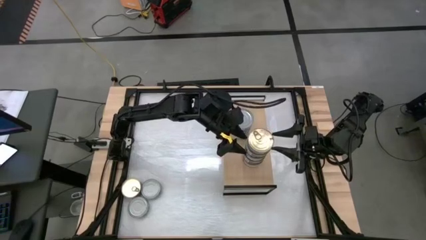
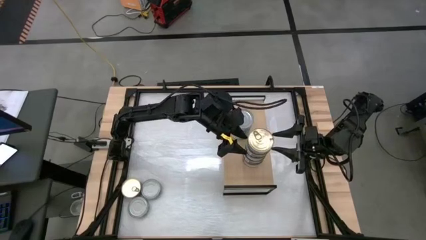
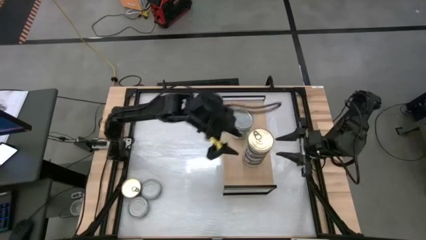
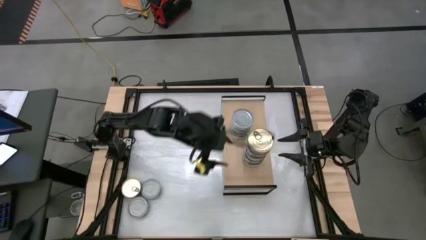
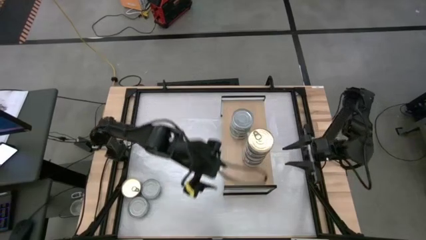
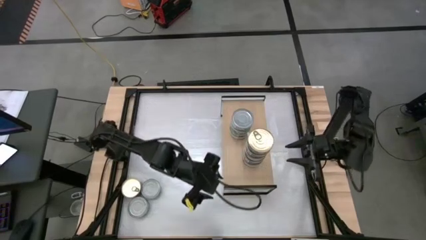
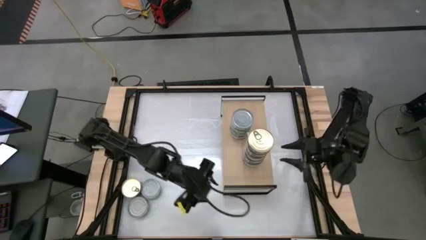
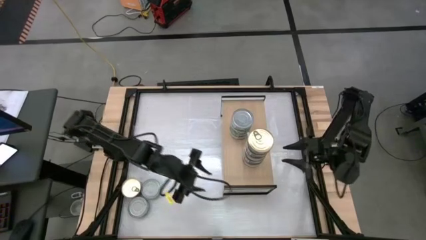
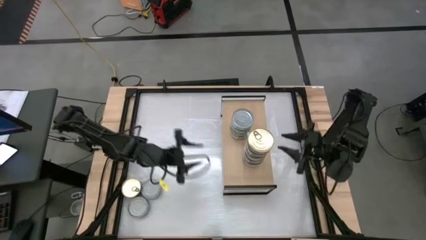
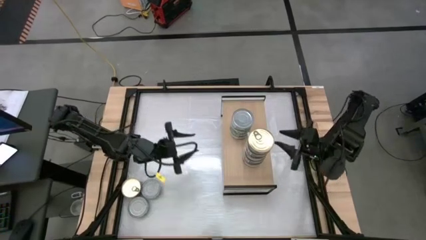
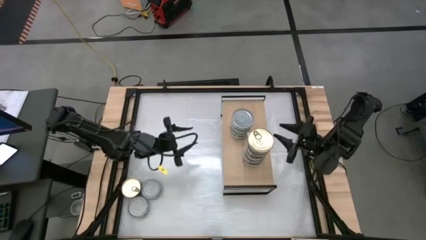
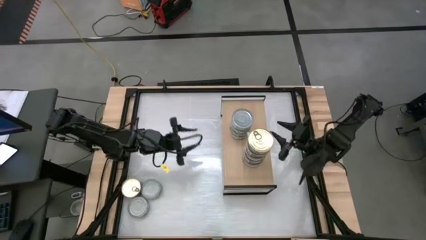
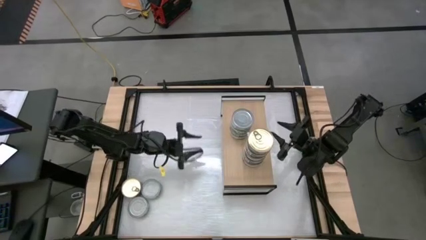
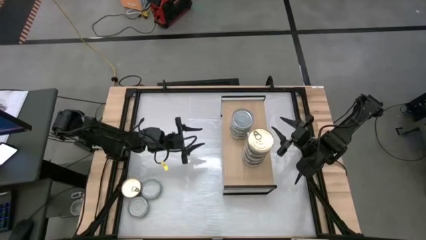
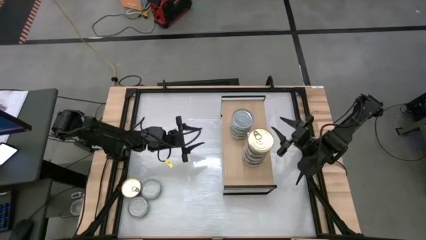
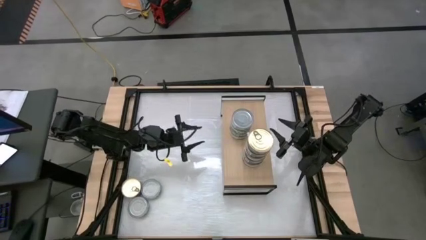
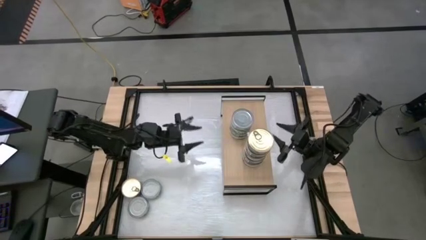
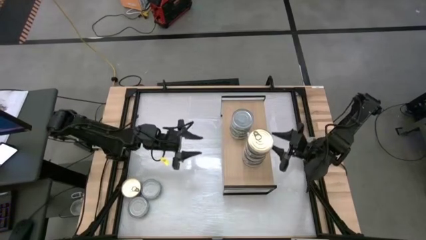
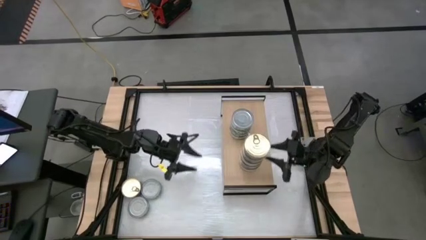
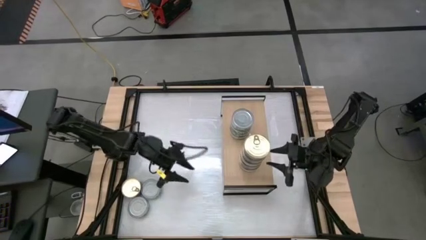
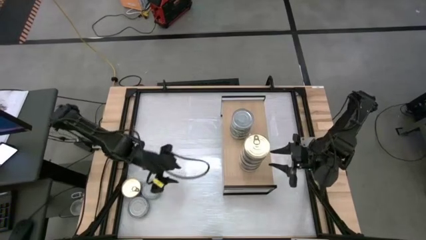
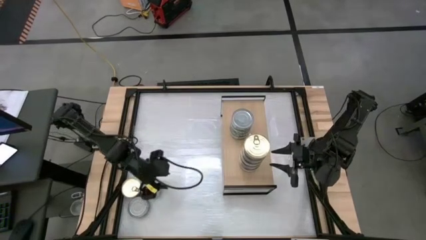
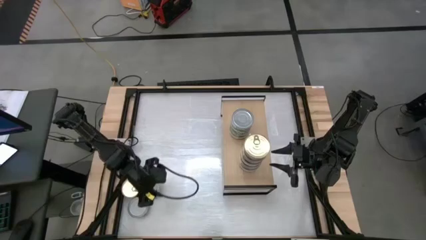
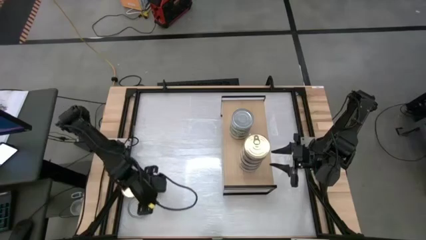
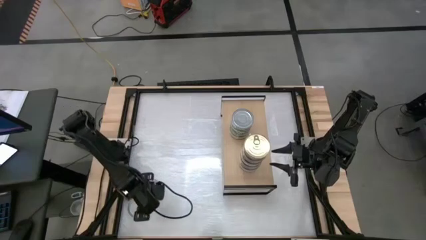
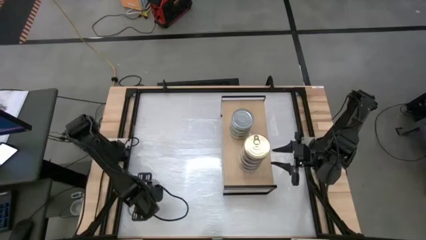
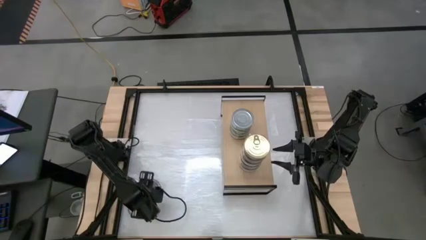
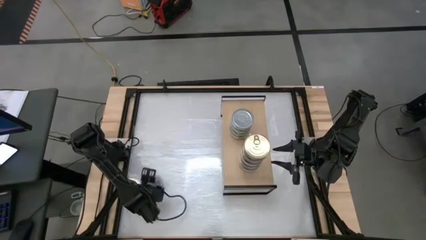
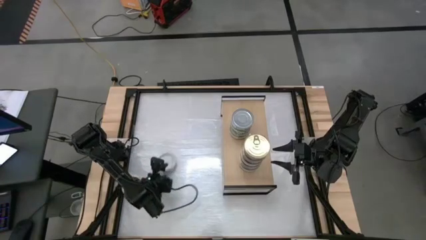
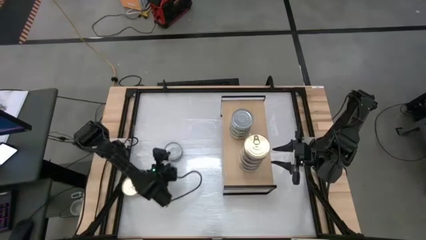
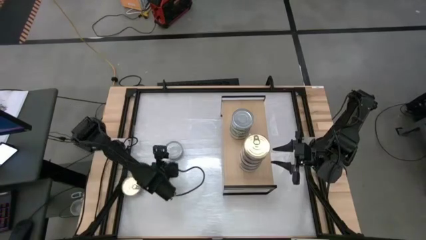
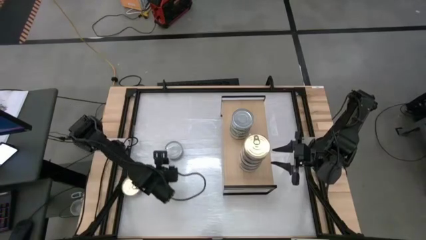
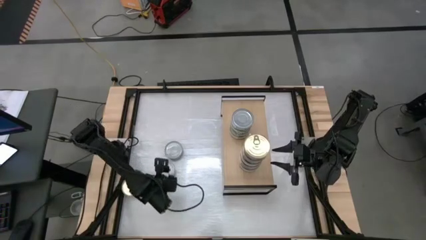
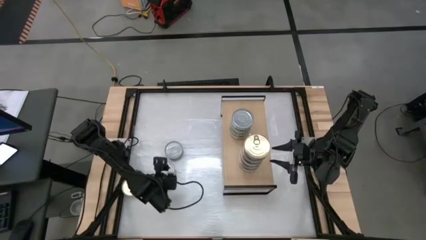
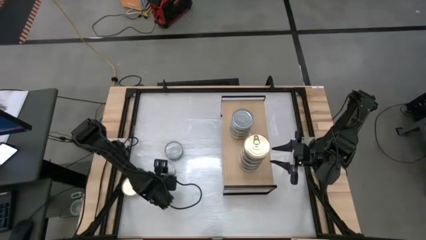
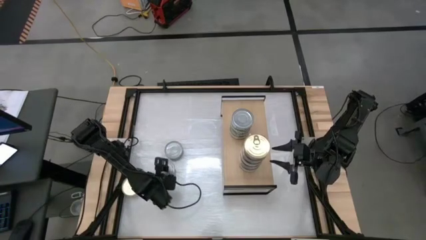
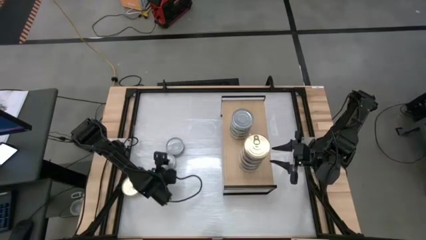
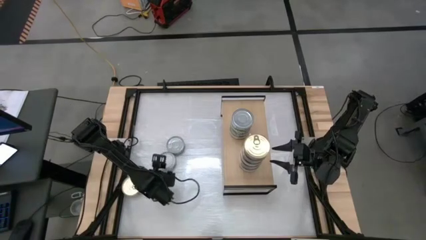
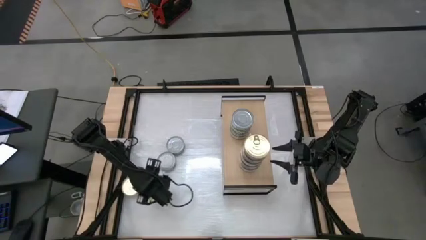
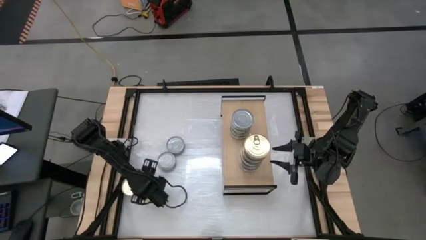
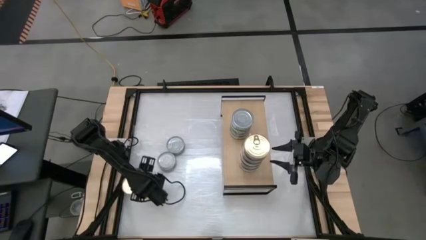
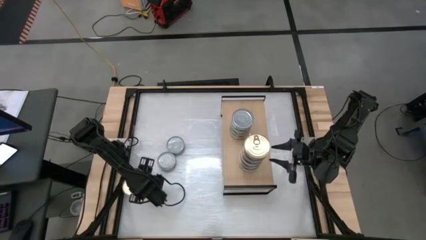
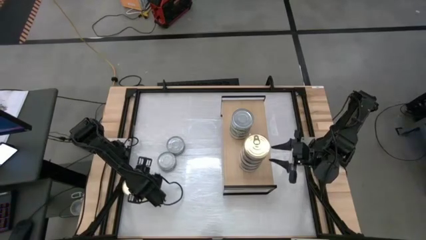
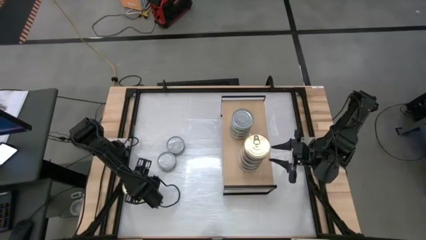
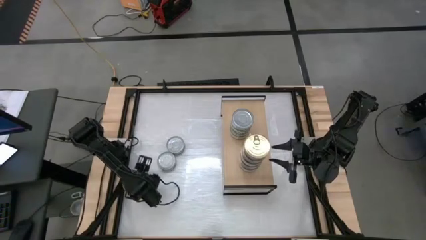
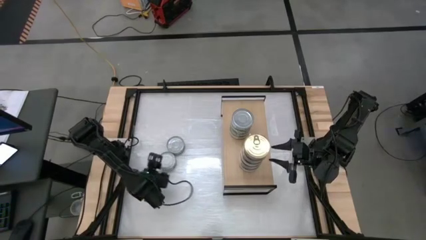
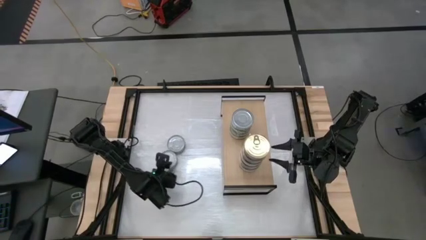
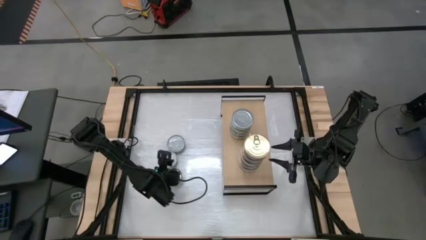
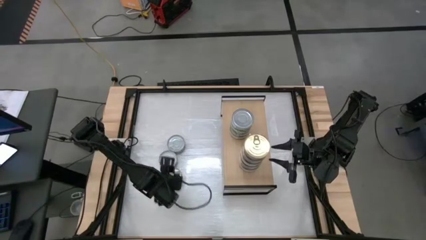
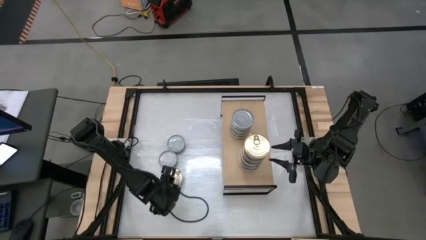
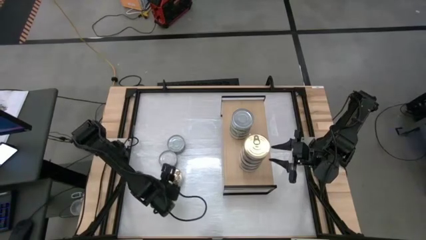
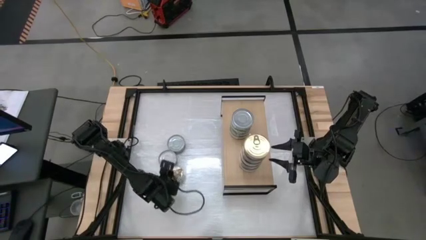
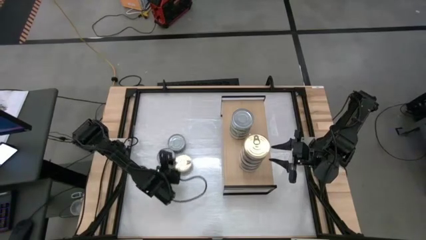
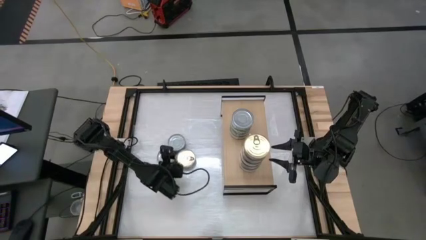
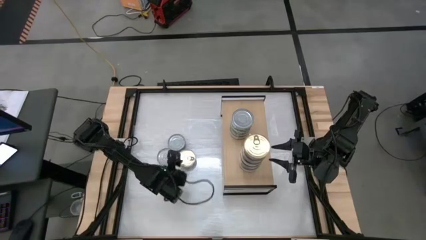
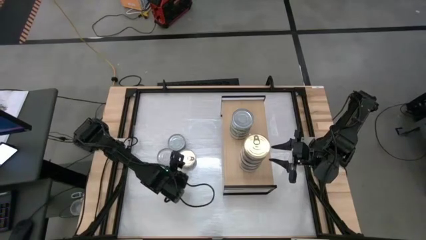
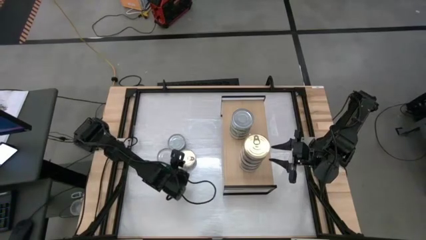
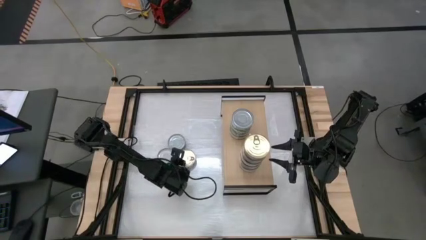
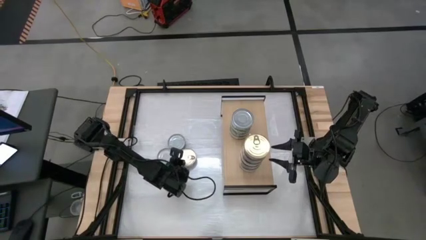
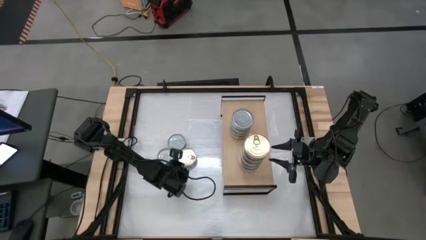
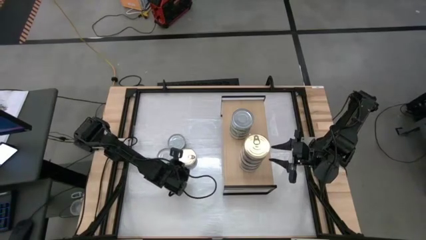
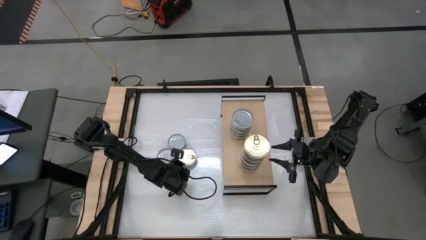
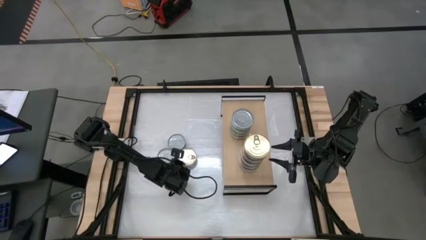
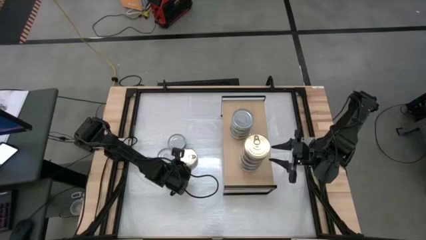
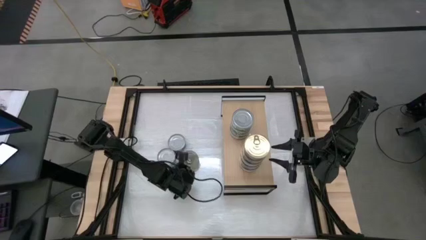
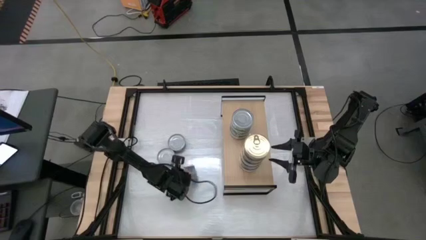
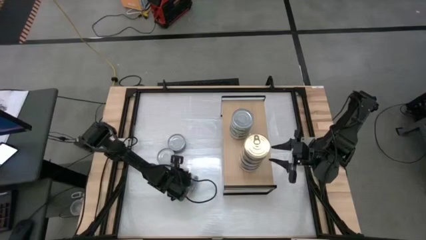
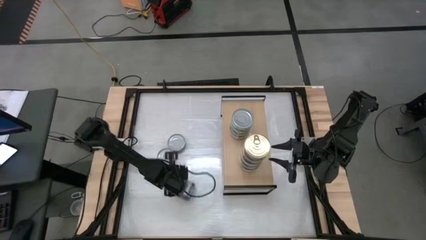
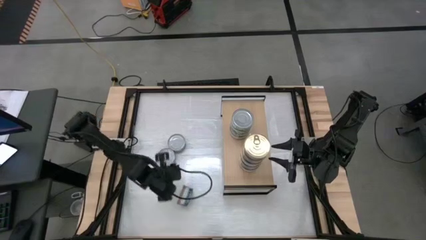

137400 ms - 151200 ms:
Task: Stack canned seafood by type on shelf
Stack the blue tuna can on top of the blue tuna can

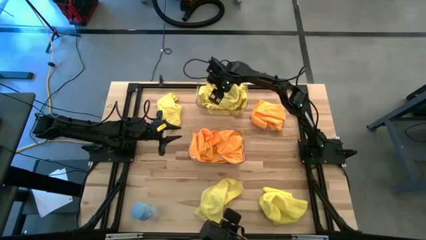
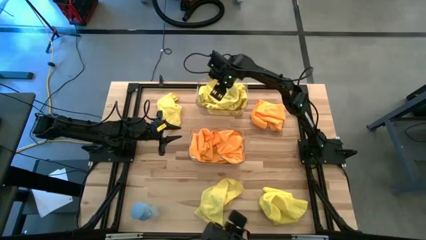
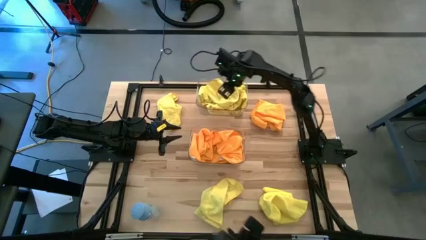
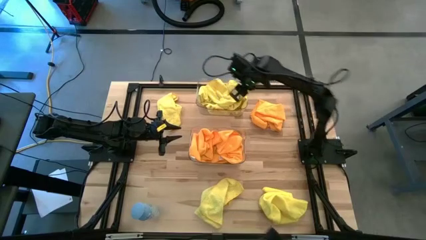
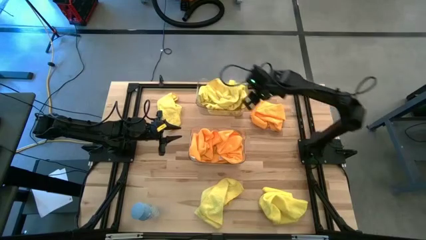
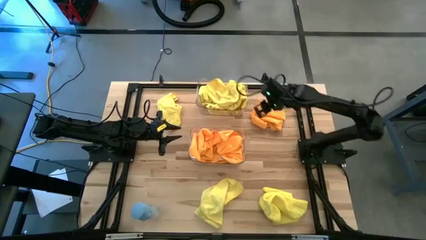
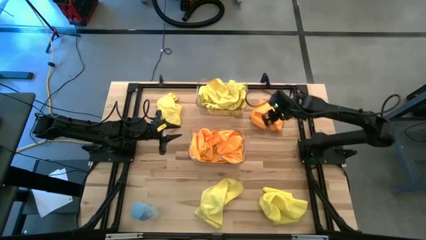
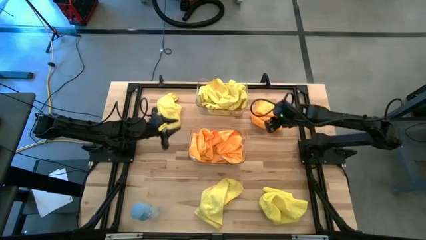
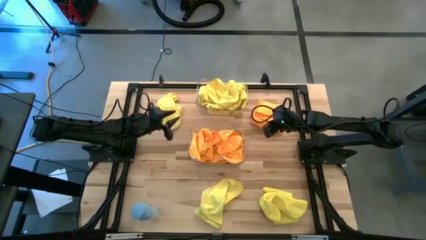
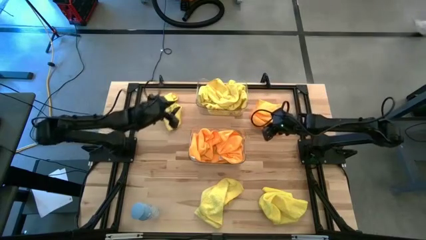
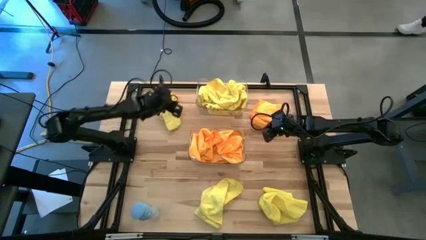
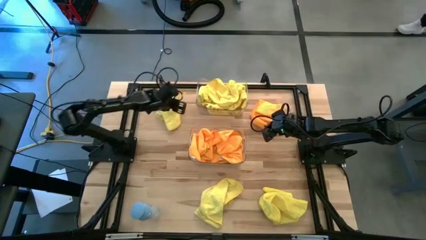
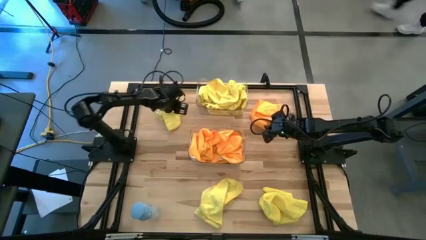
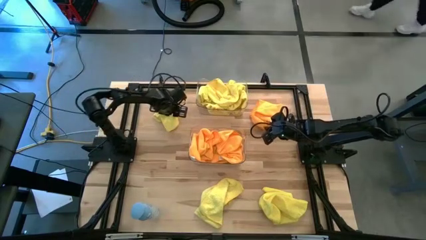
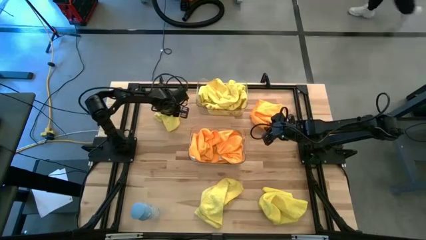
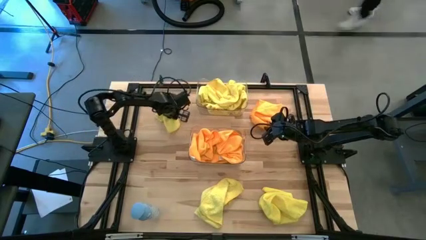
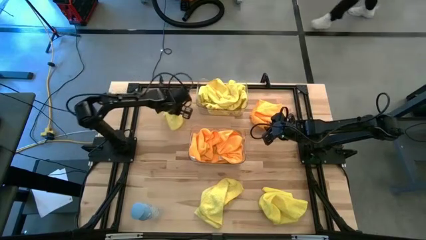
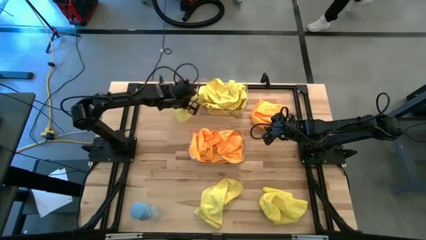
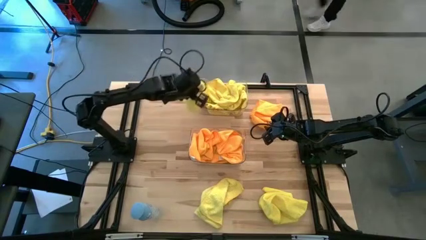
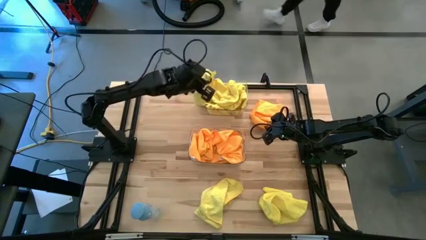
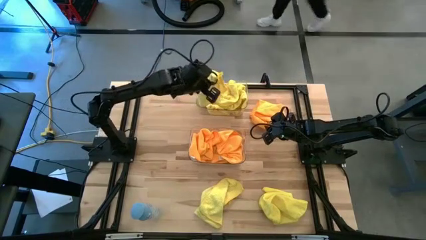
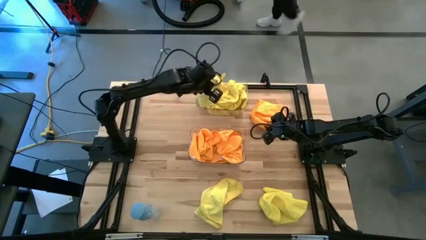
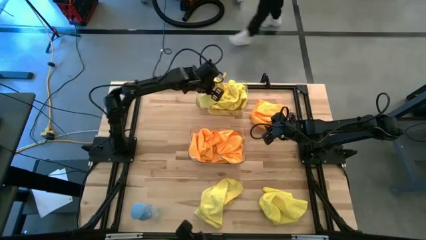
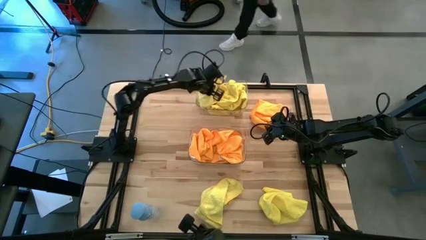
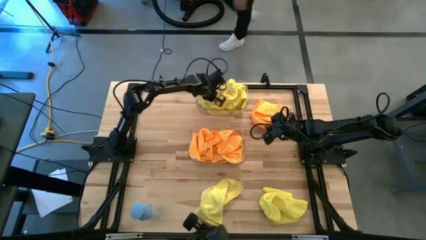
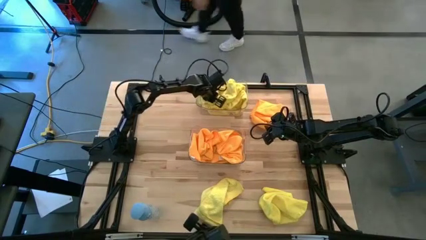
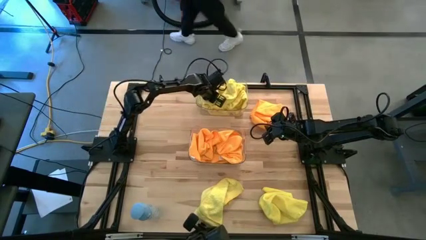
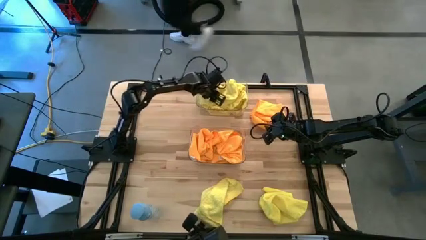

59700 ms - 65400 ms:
Task: Sort microfiber towel by color & place in baskets
Put the yellow microfiber towel into the top transparent bin
